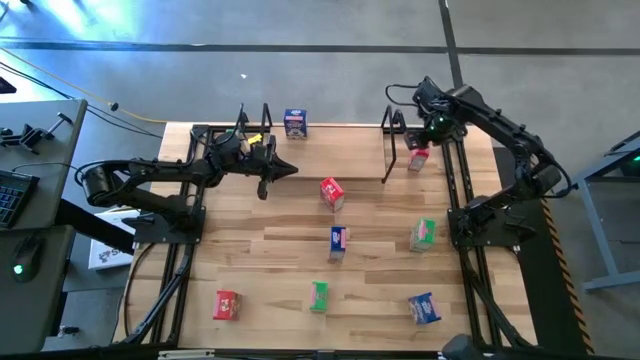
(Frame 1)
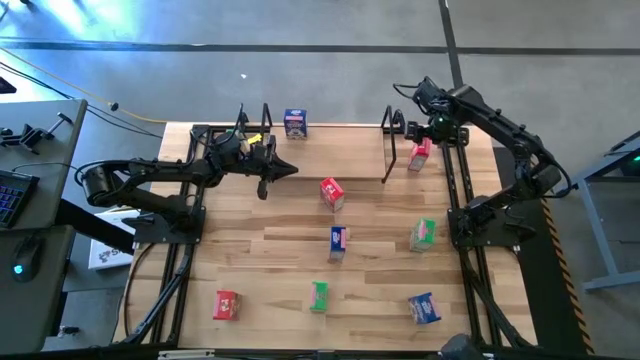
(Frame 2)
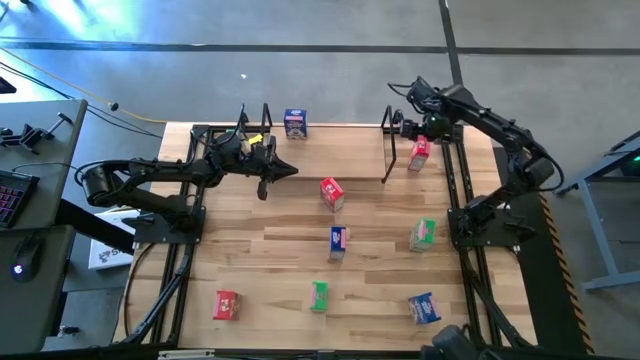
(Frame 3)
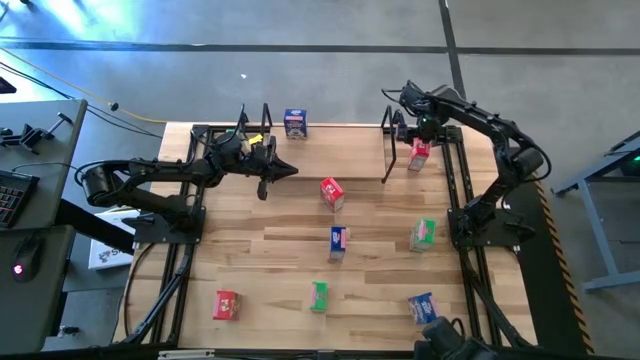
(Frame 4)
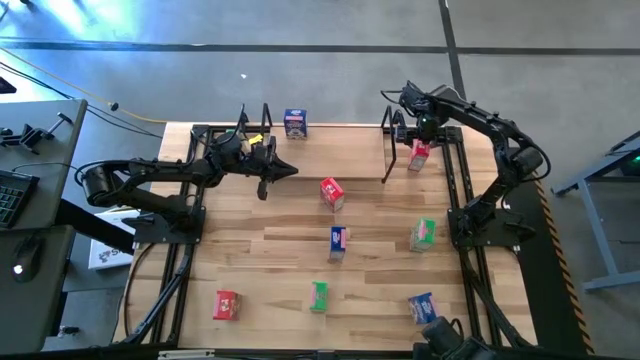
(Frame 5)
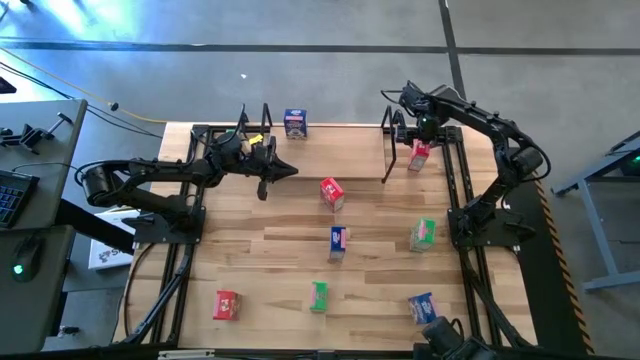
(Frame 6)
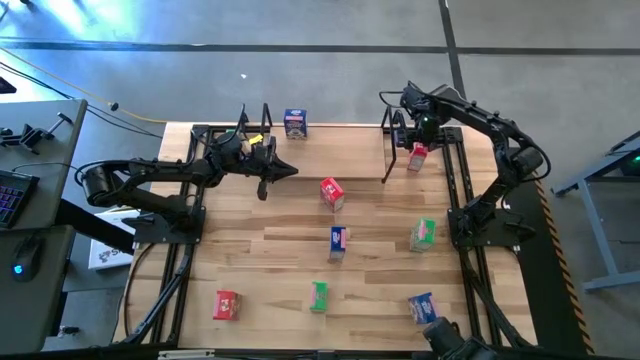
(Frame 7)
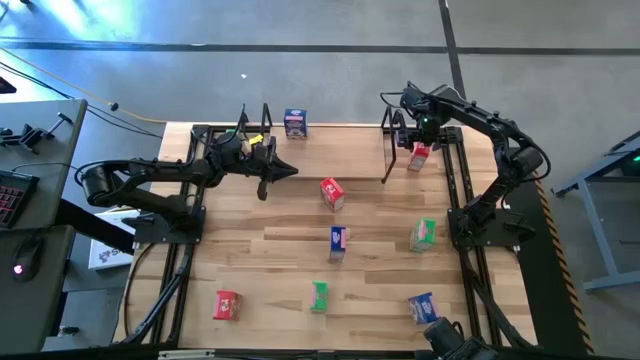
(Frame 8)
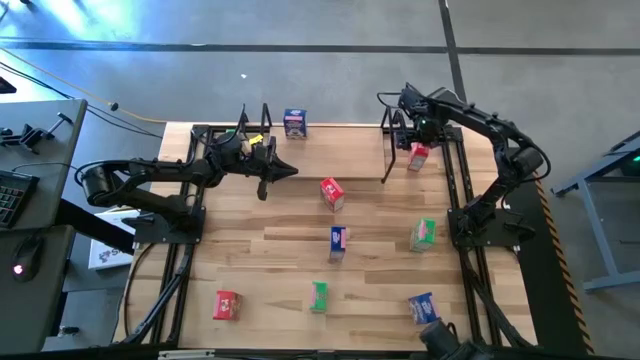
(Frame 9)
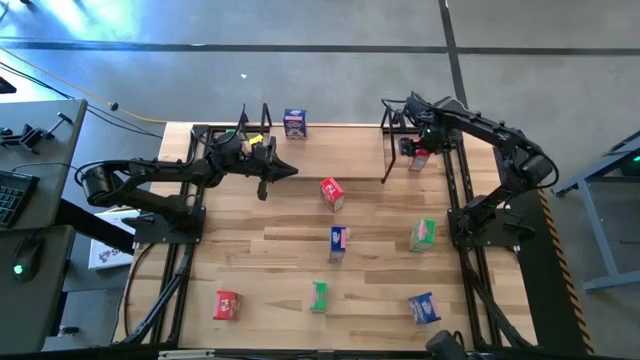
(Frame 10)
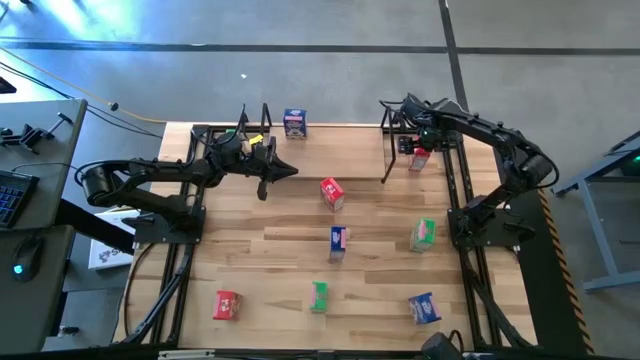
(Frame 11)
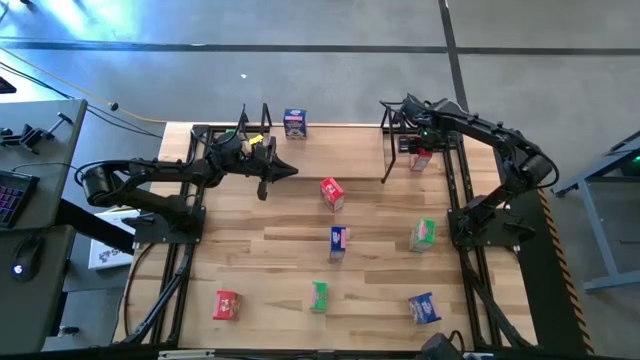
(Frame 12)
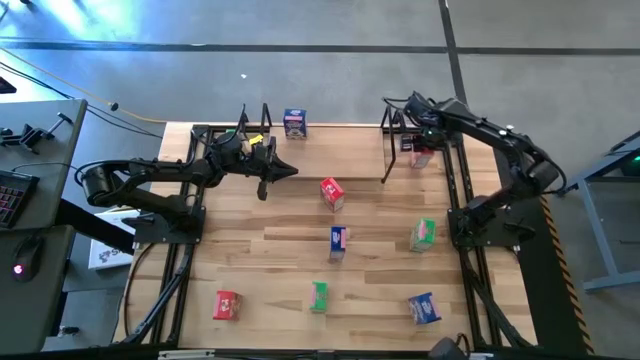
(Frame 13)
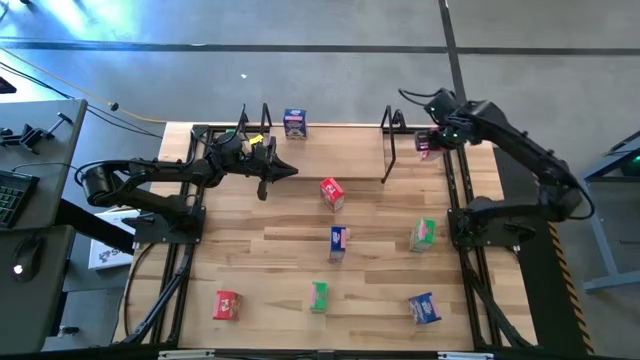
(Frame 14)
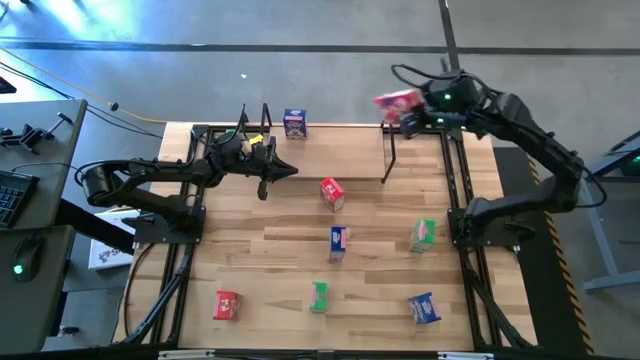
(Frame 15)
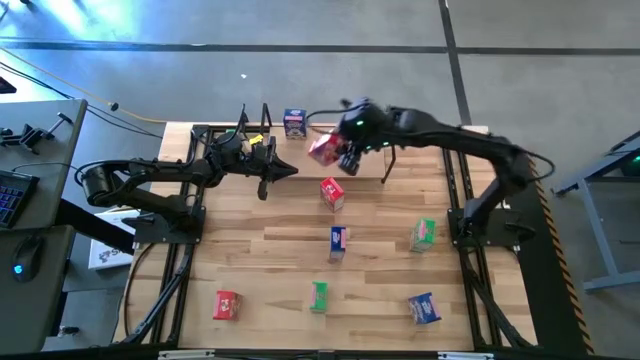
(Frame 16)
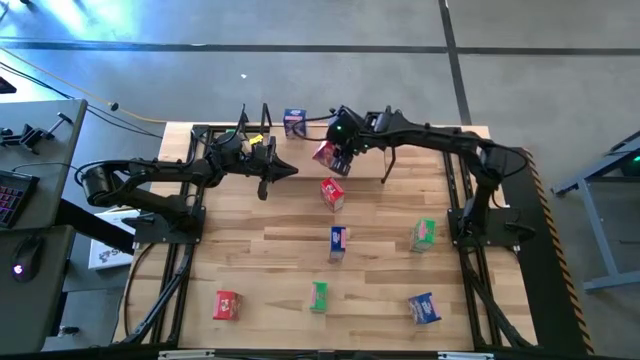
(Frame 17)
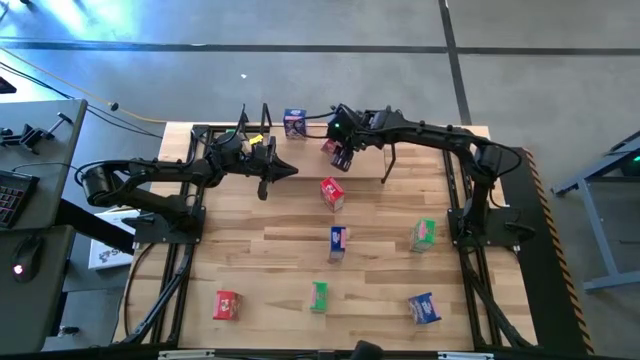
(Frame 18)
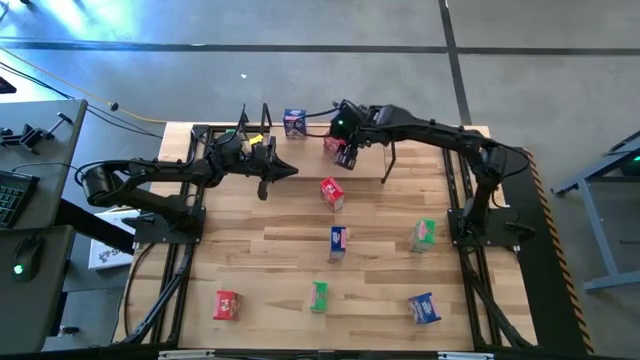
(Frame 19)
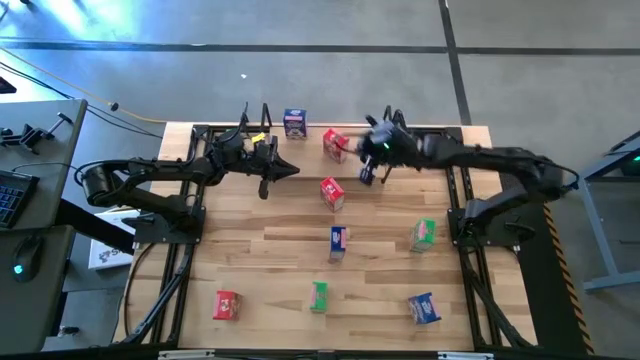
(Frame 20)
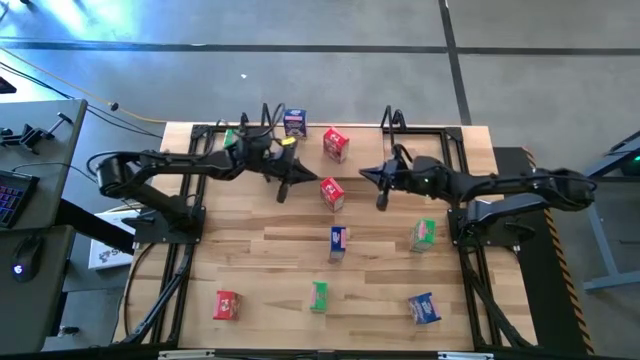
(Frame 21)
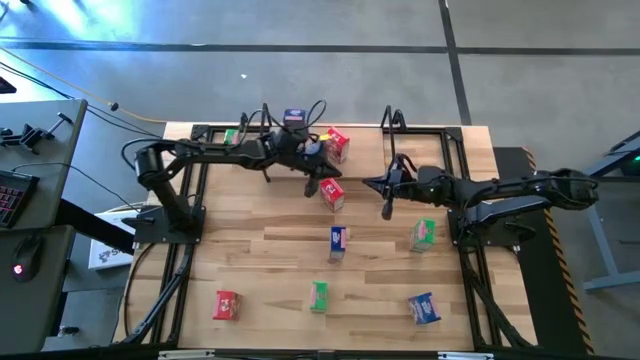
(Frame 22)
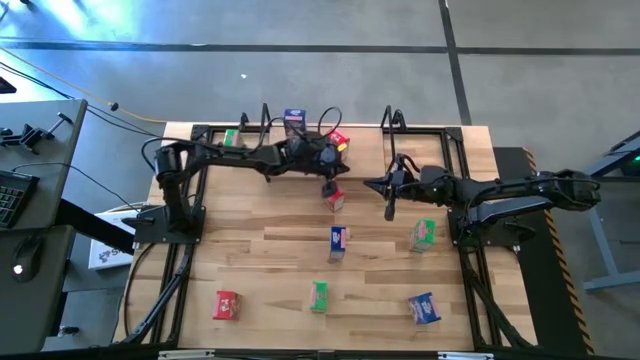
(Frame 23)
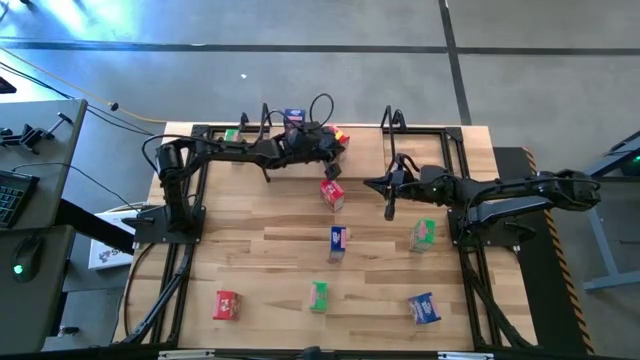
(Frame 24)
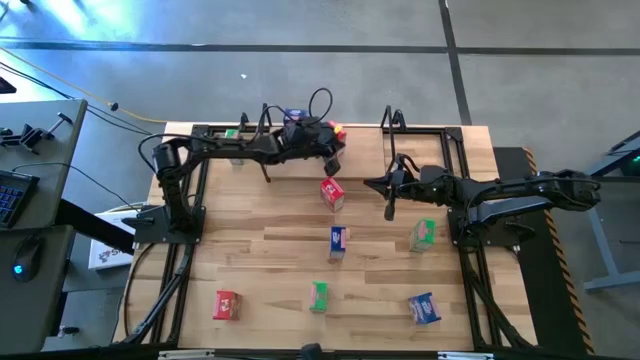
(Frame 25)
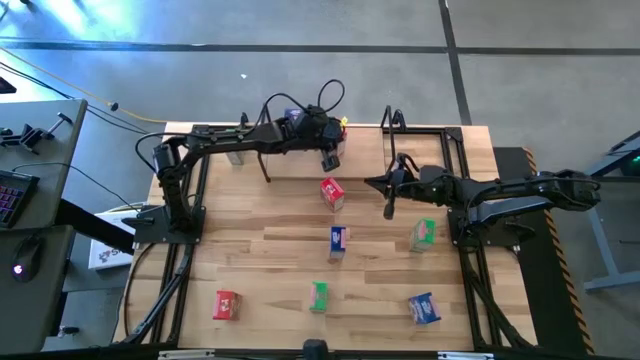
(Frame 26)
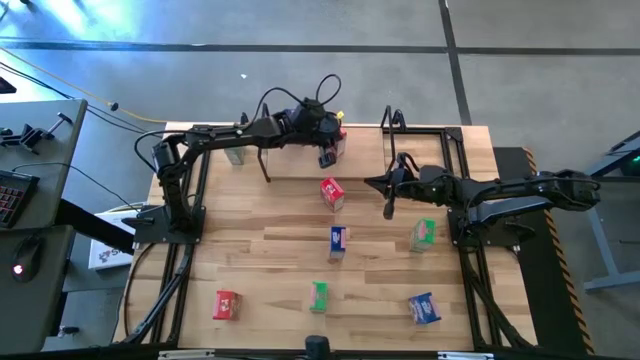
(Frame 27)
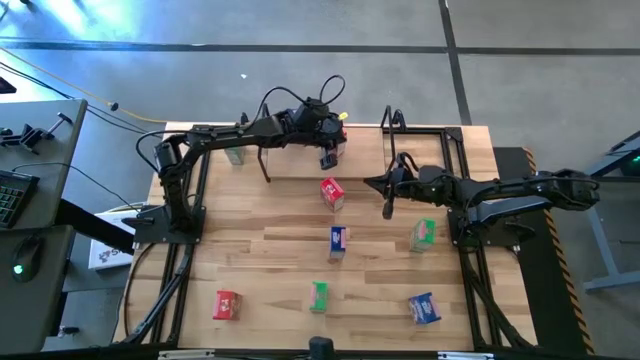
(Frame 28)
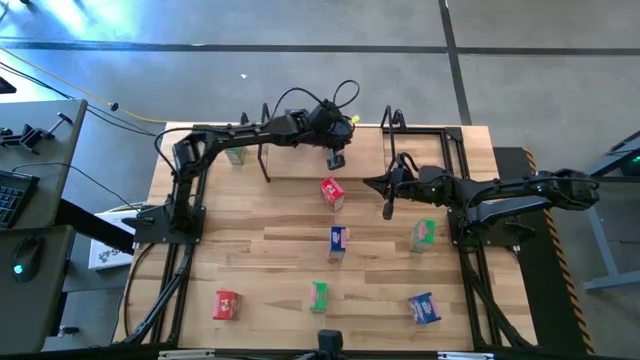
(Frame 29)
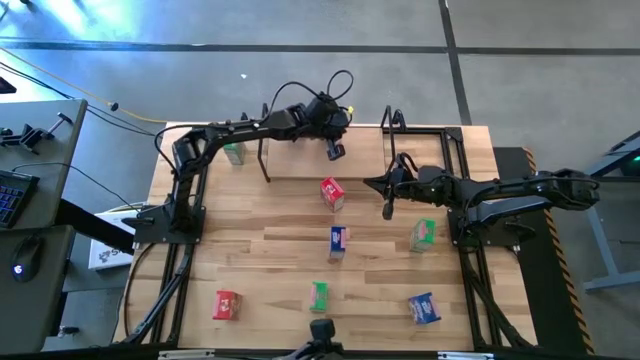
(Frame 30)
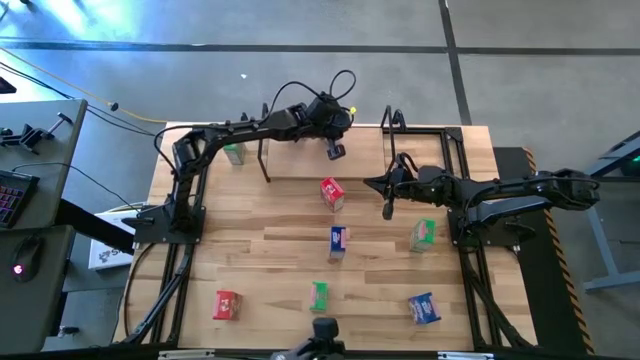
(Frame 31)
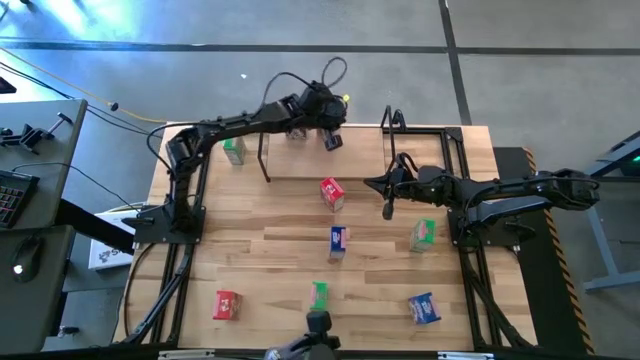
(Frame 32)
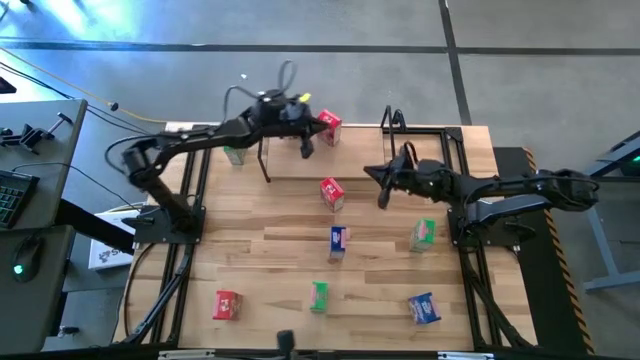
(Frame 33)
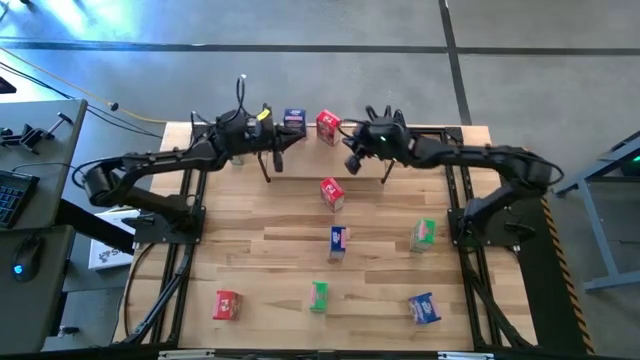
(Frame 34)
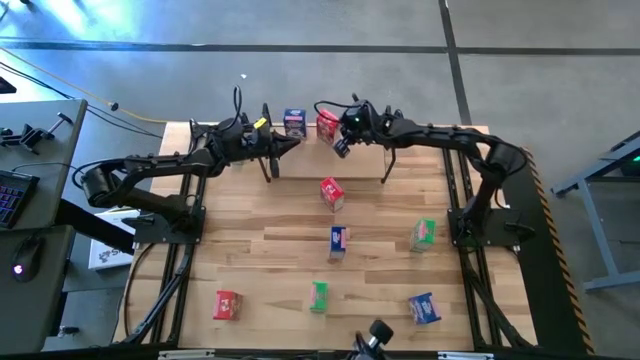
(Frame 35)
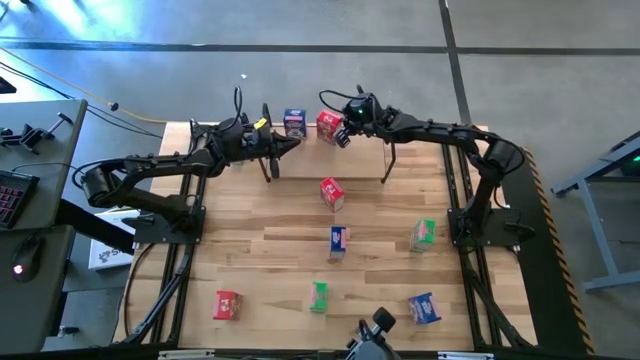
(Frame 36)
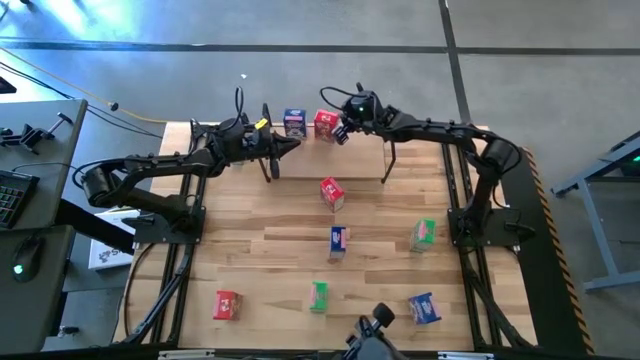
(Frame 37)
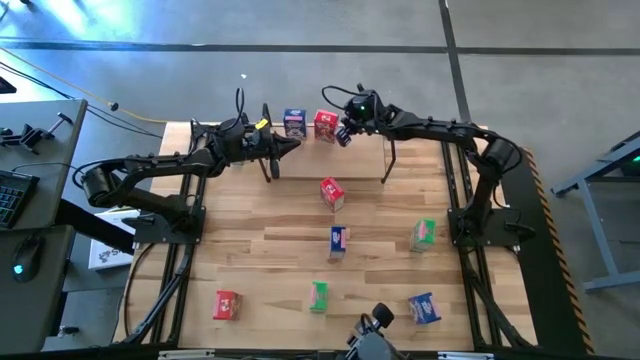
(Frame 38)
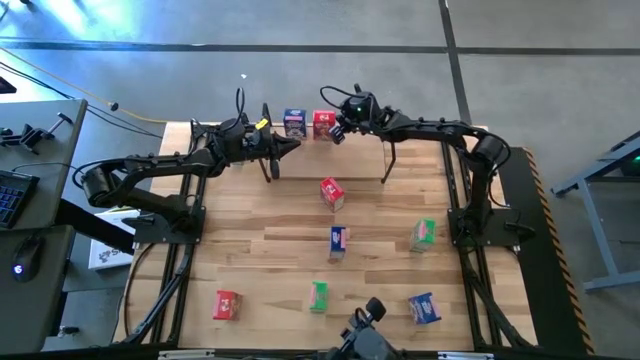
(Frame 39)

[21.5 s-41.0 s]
Task: Stack cereal on shelf
Put the top right red cereal box on the shelf
